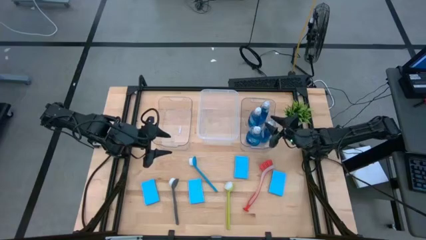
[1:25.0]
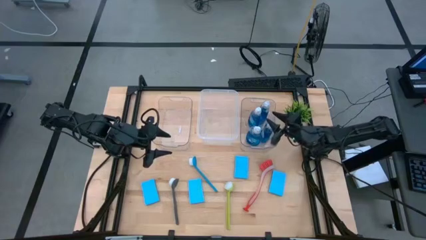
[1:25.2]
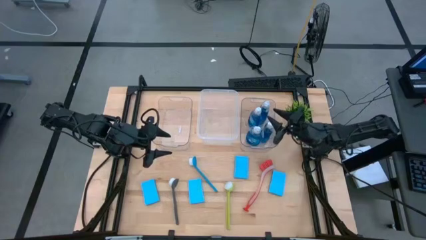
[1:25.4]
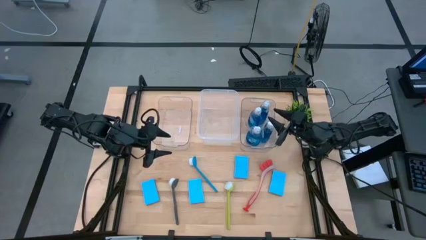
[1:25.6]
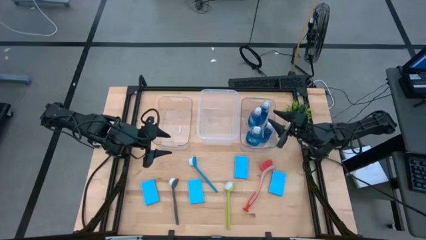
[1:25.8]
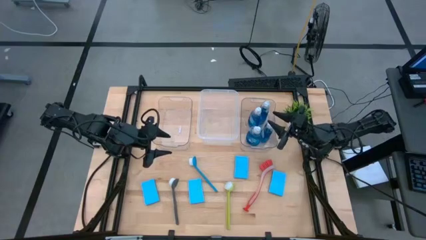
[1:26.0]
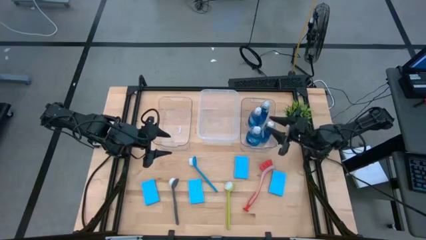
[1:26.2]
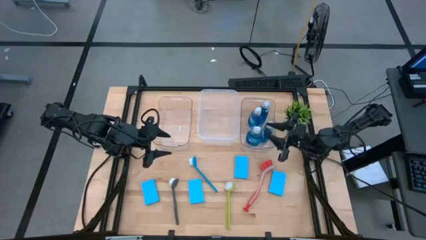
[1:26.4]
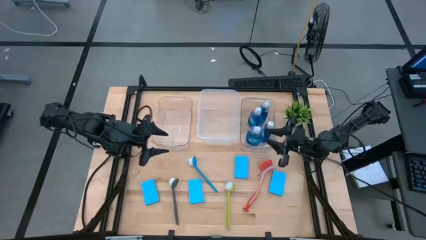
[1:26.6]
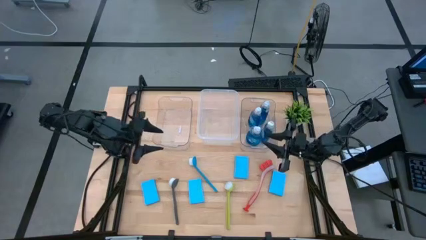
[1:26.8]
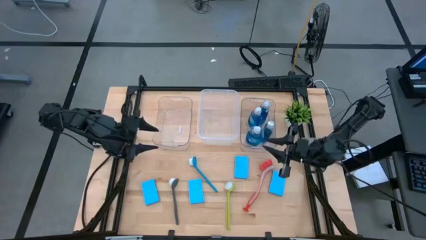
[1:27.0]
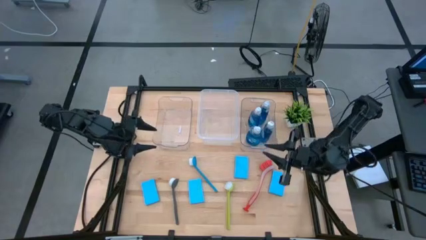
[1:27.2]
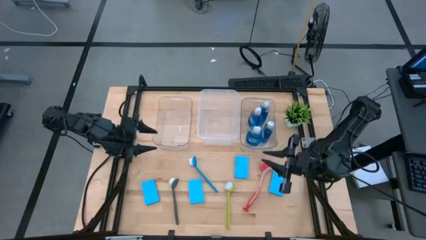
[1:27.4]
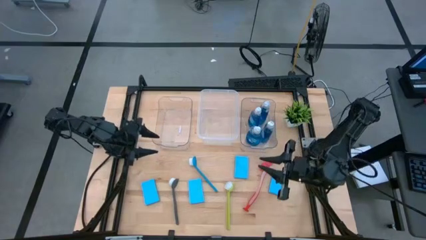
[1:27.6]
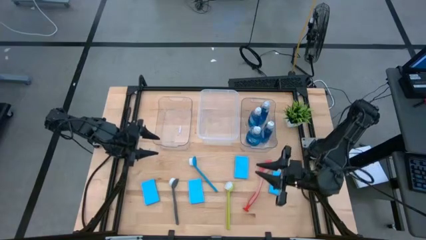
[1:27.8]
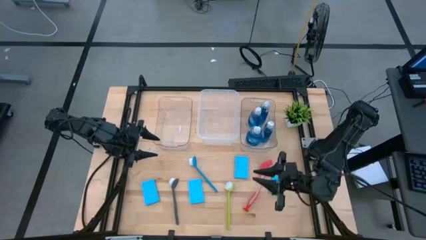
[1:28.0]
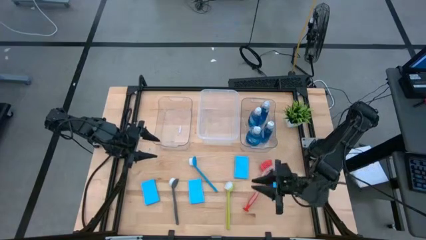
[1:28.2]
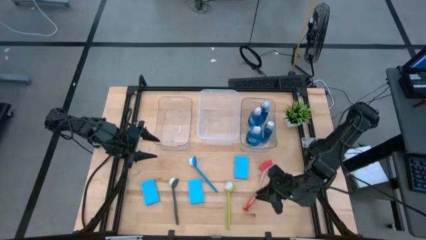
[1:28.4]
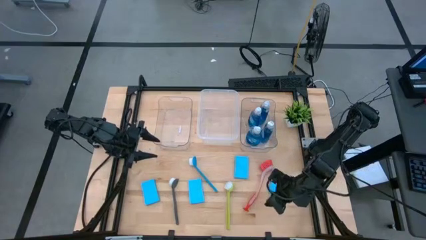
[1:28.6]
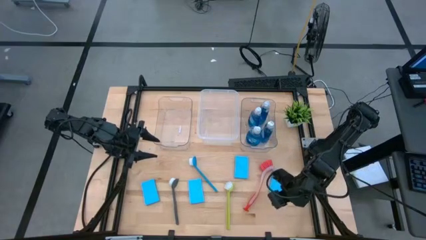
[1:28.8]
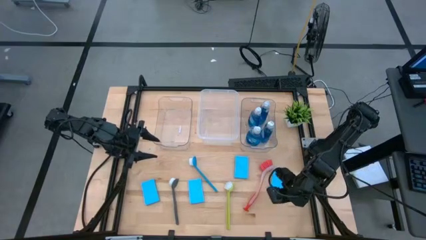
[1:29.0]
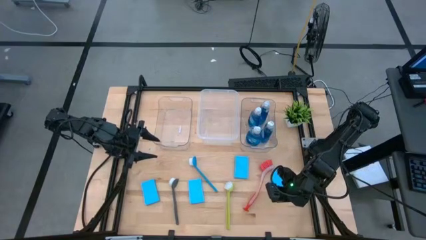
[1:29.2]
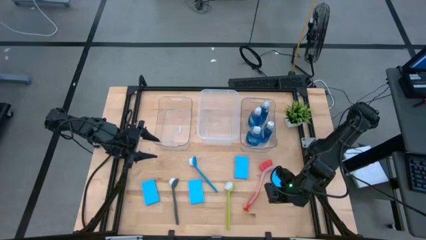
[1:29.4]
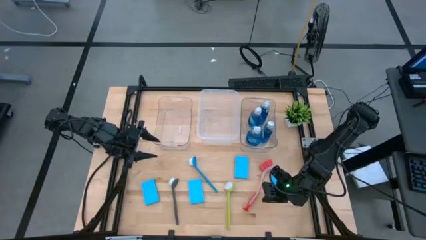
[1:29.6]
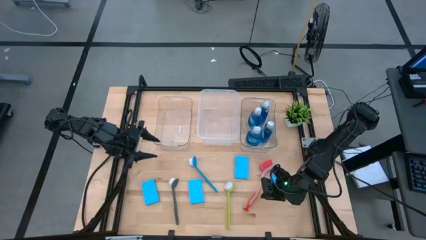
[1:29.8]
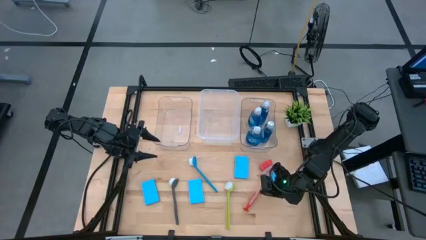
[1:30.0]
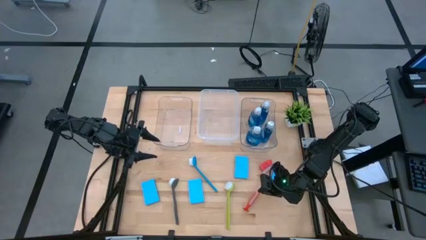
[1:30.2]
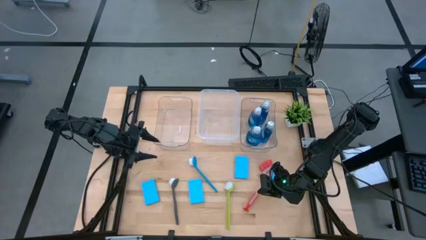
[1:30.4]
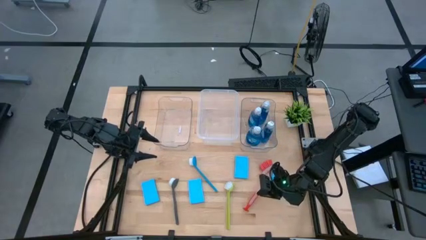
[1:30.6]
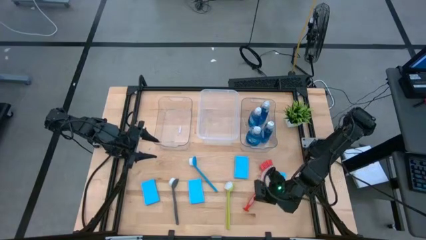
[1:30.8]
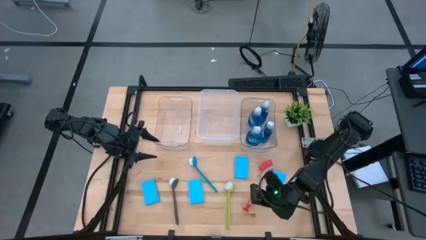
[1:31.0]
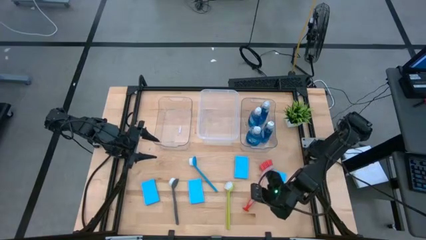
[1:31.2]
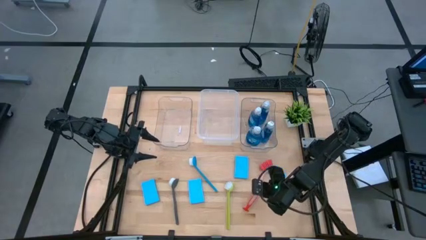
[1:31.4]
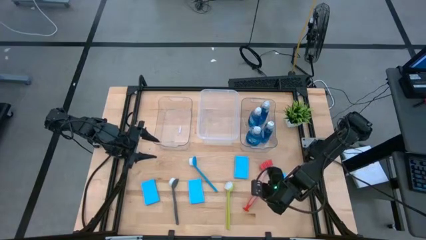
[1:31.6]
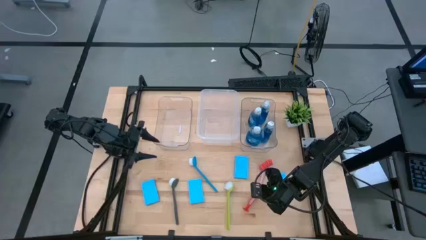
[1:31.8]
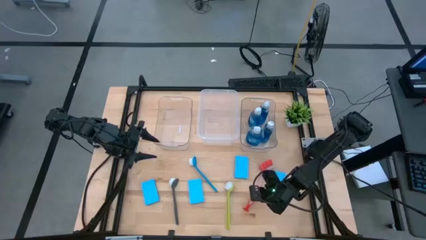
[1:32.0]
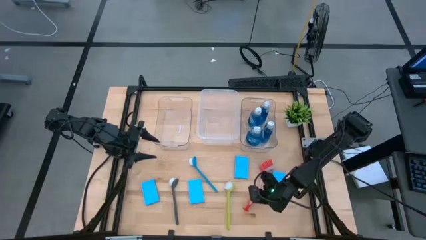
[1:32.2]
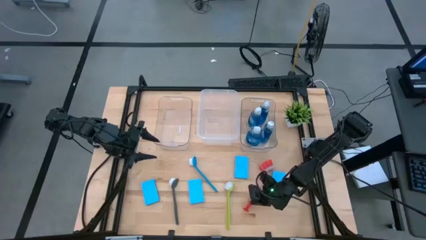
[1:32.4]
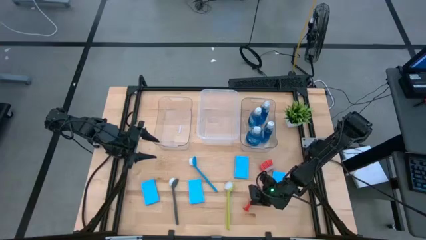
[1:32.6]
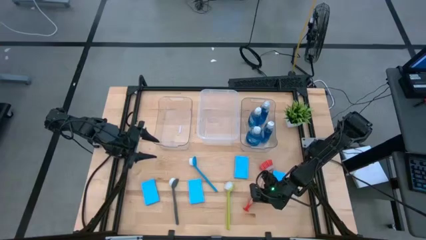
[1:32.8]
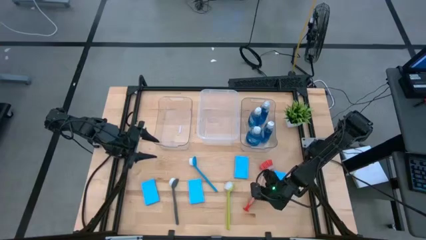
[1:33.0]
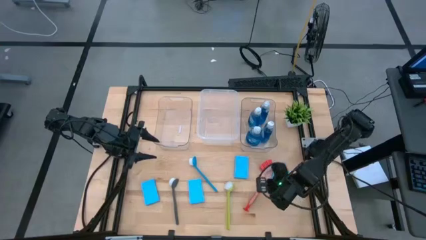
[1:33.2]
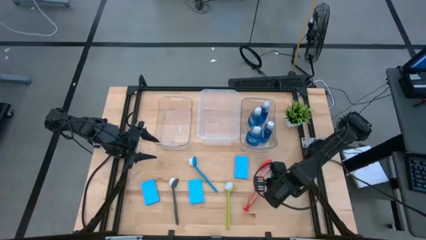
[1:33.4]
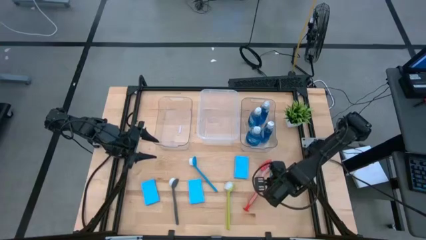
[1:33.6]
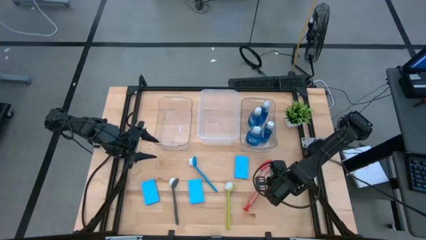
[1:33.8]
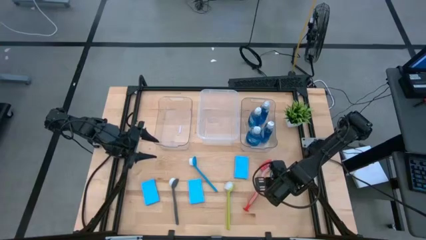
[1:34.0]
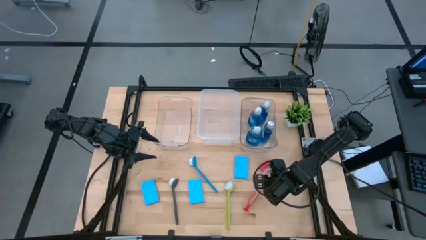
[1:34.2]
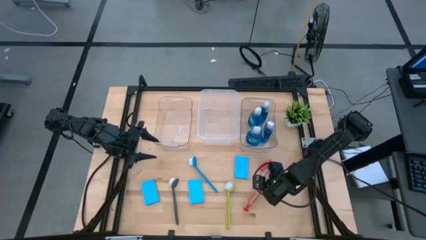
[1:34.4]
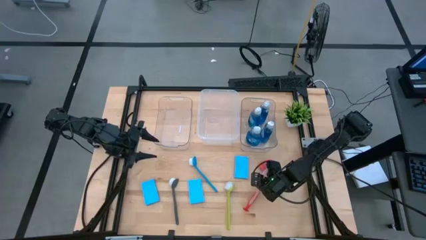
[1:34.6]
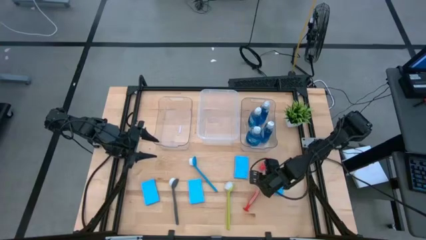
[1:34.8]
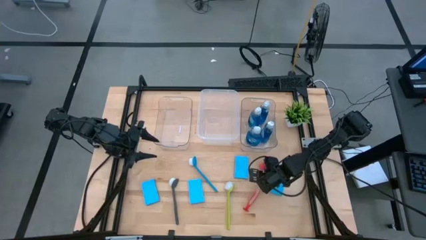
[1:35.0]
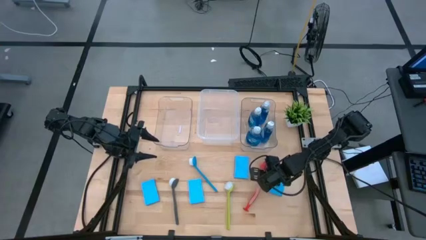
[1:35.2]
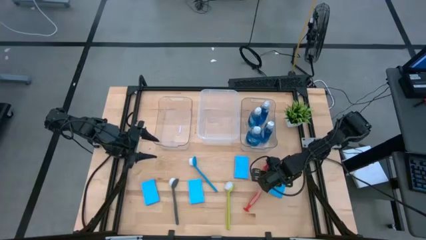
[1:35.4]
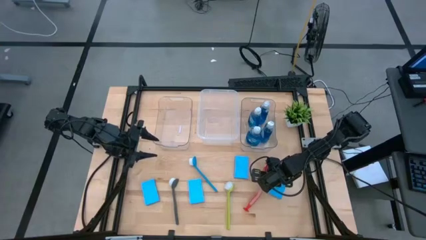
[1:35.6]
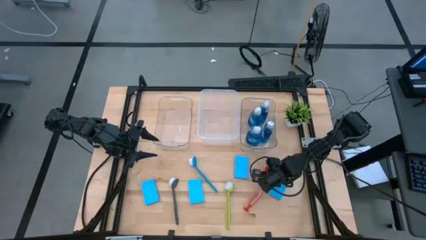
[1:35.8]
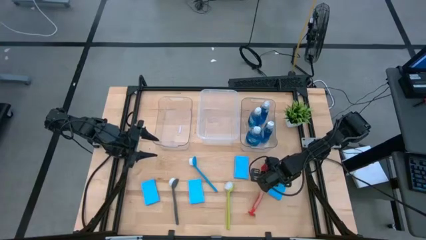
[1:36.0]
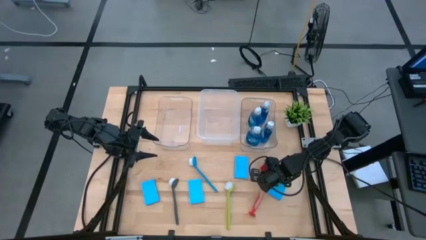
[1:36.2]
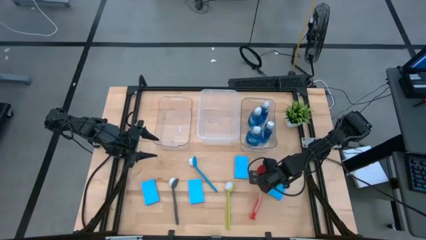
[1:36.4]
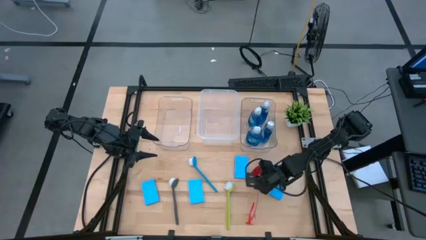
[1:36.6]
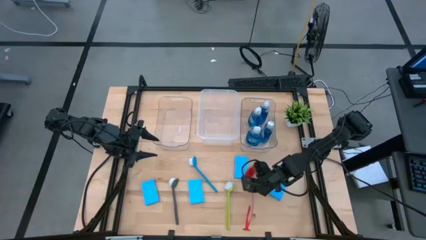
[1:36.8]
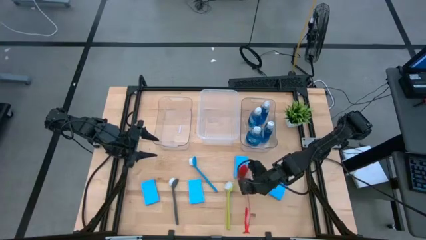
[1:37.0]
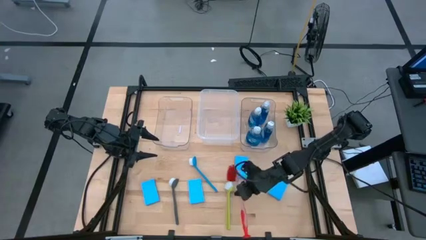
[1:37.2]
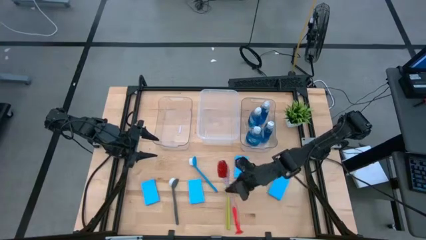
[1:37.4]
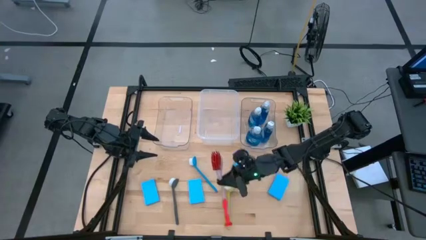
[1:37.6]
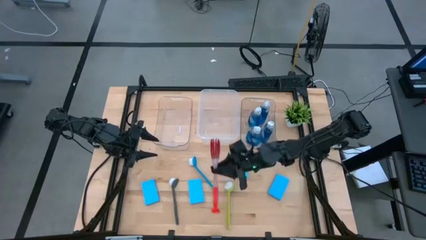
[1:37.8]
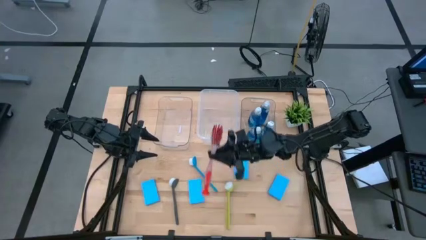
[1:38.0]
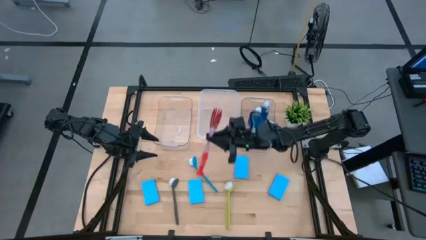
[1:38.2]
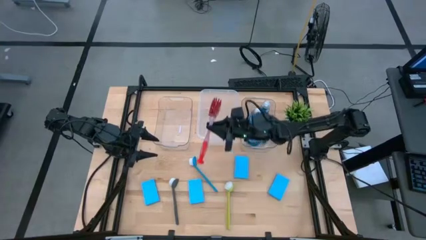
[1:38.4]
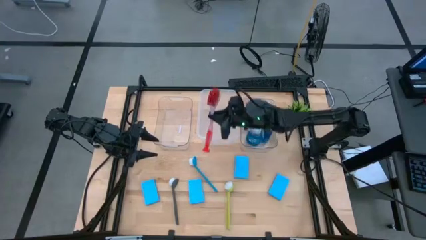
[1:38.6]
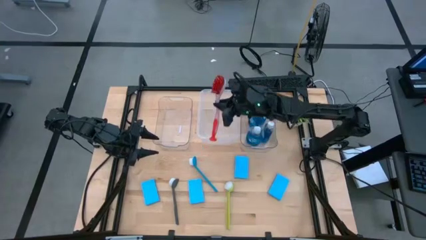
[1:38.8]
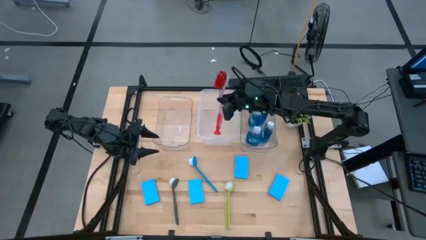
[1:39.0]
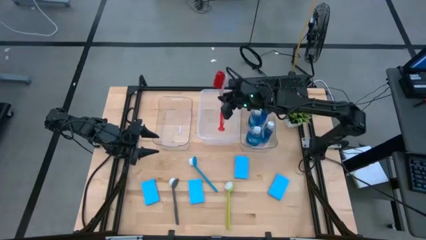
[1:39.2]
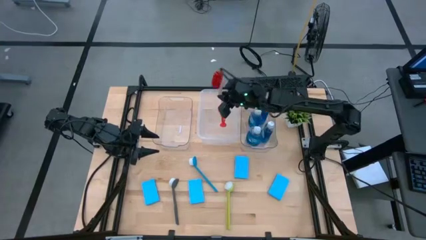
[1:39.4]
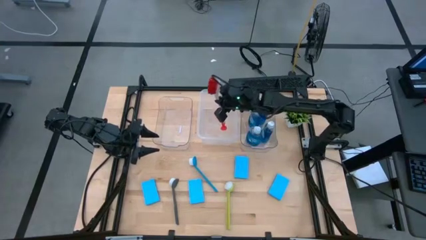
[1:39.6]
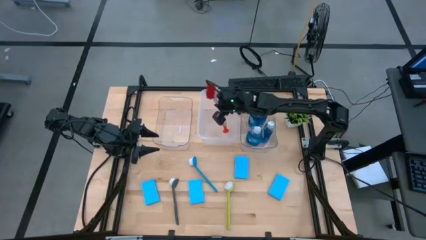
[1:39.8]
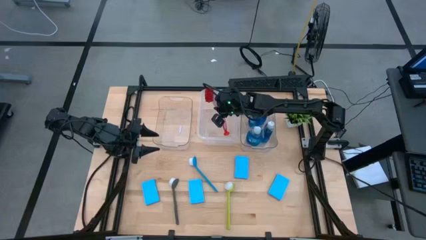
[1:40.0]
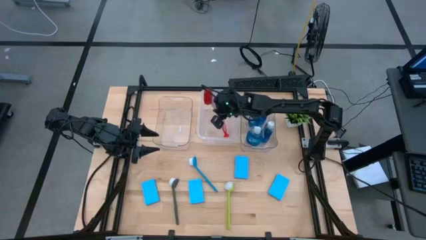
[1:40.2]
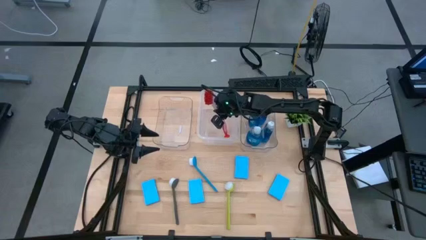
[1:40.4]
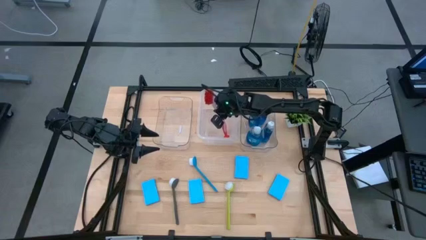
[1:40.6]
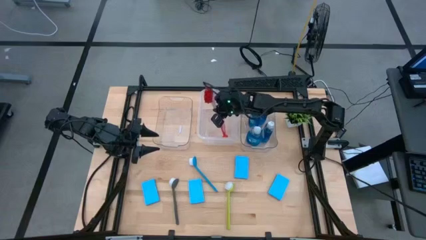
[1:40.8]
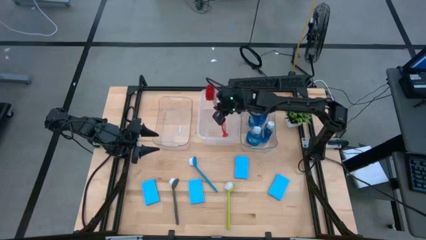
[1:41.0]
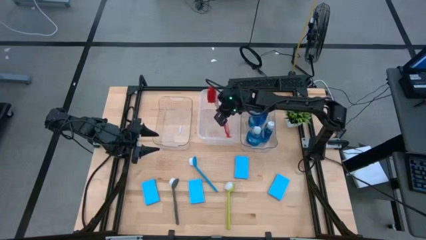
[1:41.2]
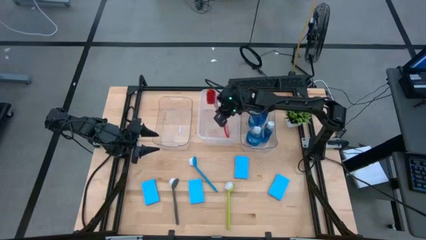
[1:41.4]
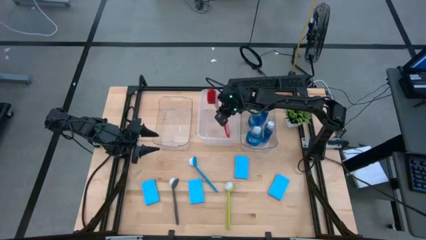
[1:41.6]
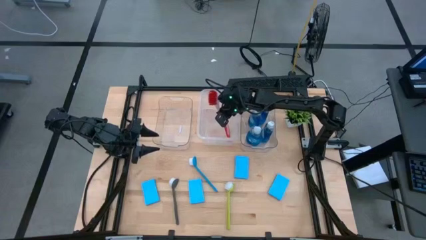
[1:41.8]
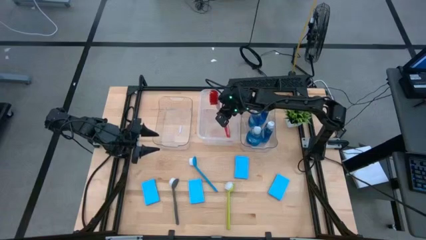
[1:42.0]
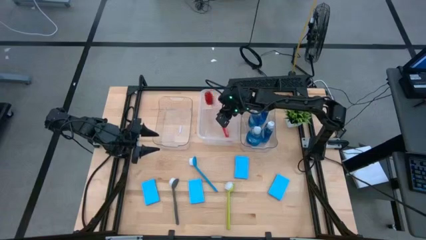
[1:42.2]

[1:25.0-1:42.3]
Task: Pick & Place Kitchen Sink Supplies
Put the red dishwashing brush into the middle transparent bin
